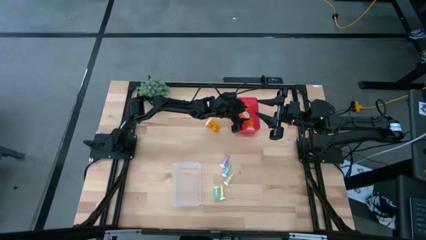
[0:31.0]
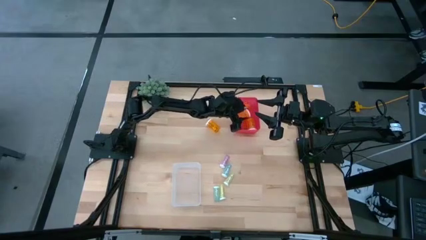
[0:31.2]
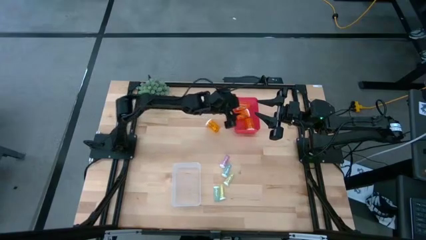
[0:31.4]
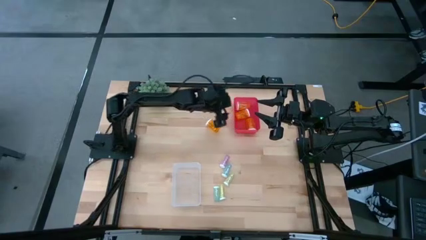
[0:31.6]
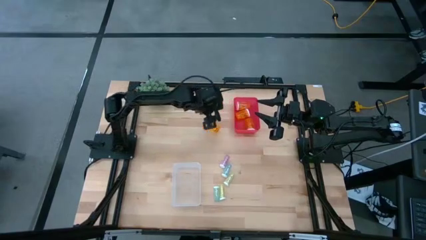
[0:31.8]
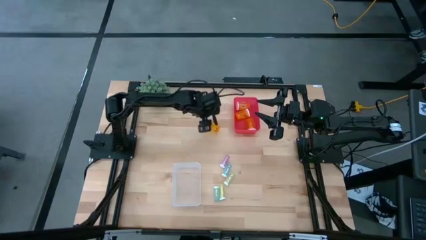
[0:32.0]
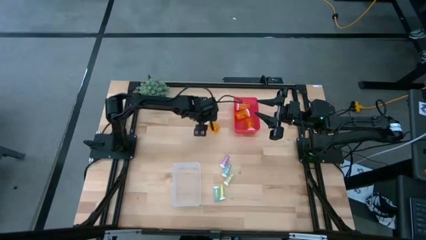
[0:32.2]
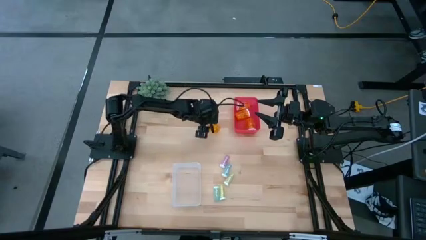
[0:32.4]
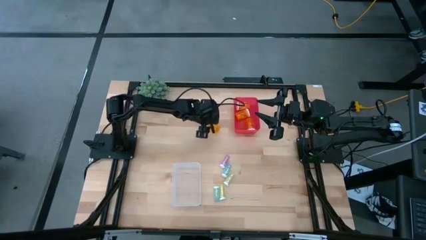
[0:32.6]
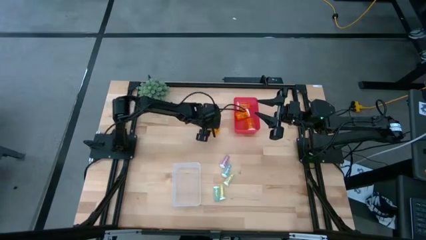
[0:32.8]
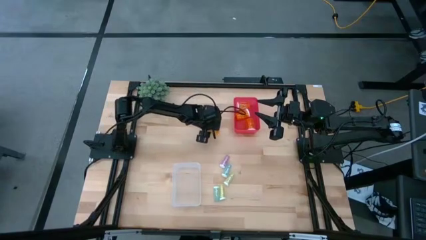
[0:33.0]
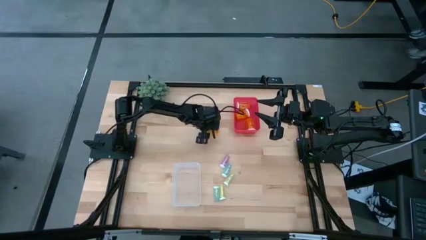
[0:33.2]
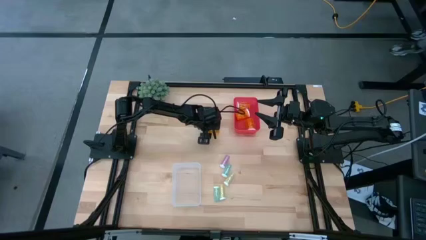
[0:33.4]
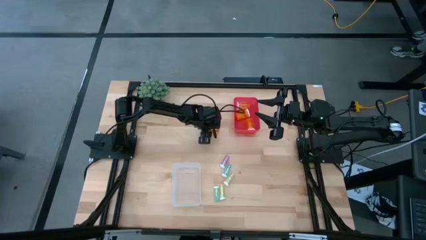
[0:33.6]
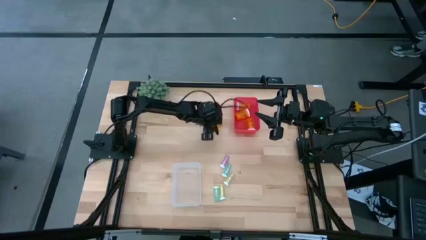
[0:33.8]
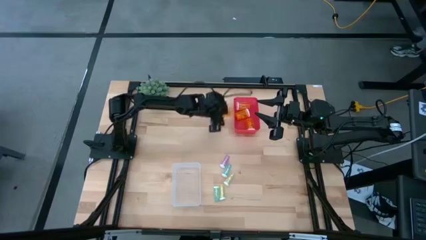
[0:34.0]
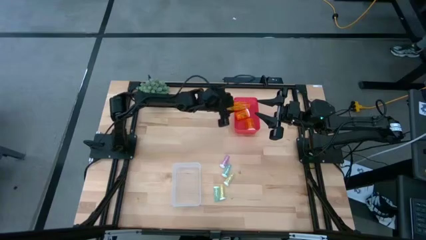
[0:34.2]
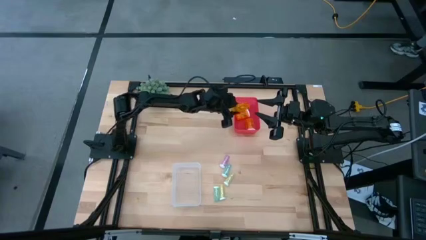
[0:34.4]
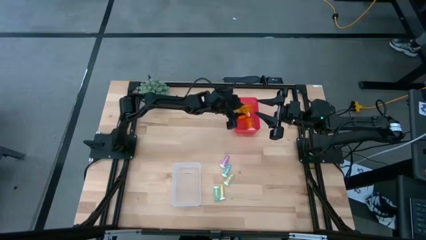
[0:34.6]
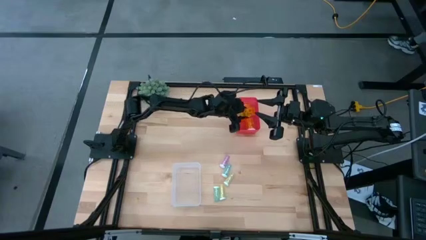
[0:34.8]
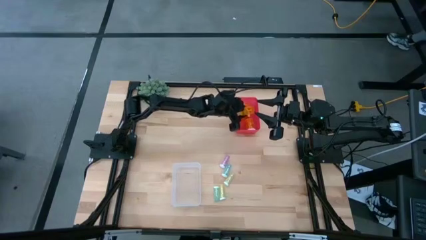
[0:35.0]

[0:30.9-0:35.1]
Task: Pick and place medicine bottles into bin by pill shape (circle, oval)
Put the large orange pill bottle into the red bin

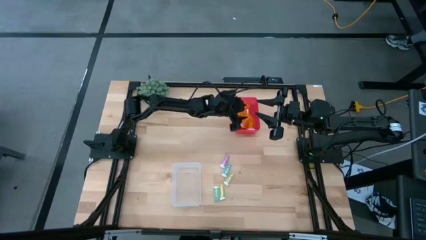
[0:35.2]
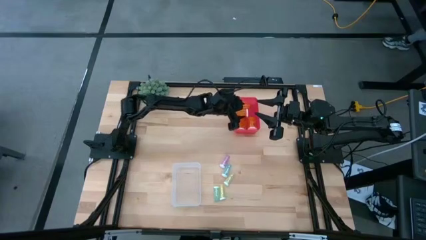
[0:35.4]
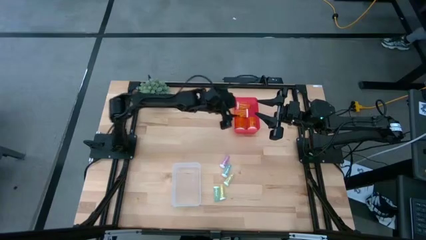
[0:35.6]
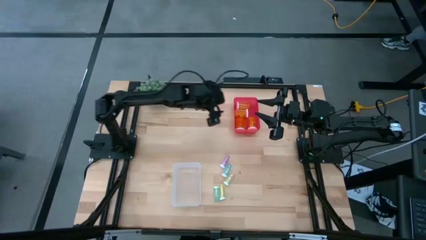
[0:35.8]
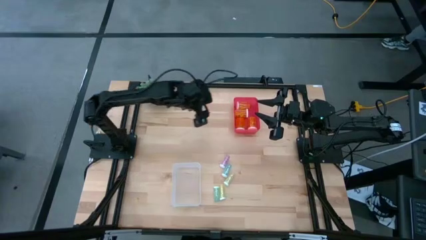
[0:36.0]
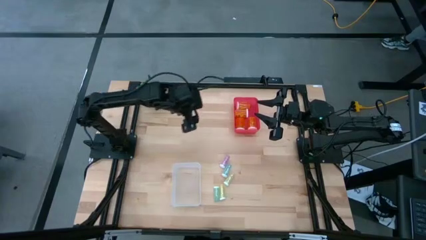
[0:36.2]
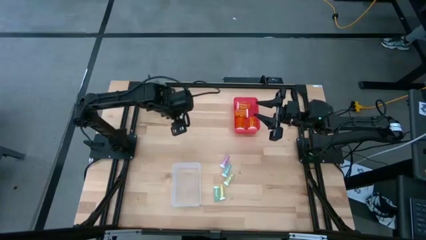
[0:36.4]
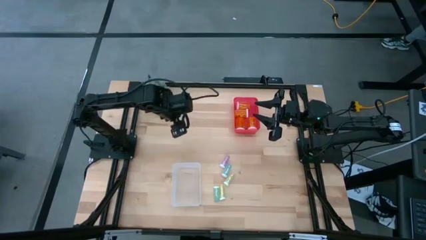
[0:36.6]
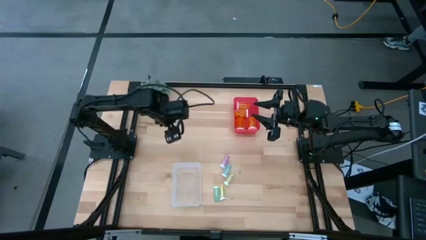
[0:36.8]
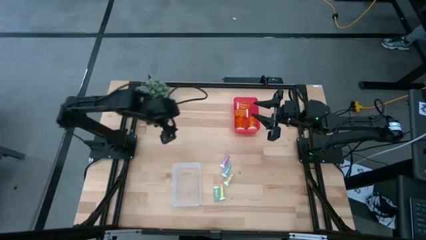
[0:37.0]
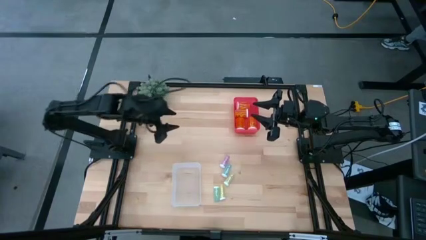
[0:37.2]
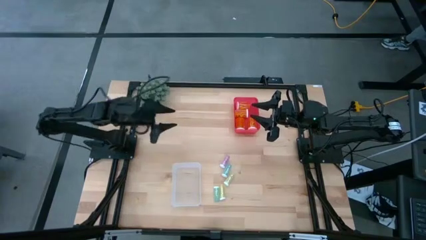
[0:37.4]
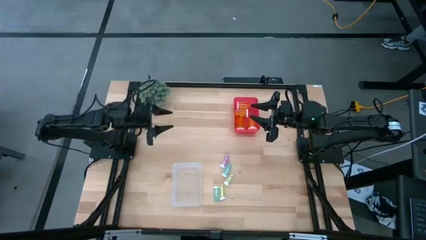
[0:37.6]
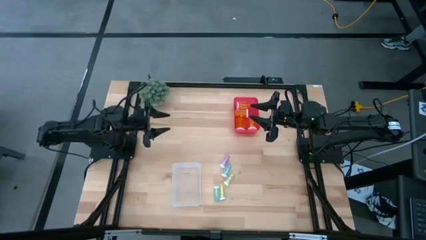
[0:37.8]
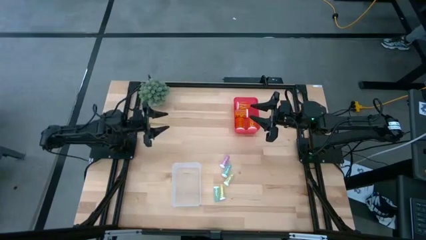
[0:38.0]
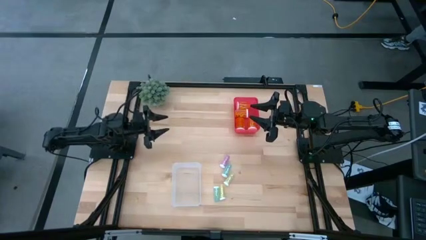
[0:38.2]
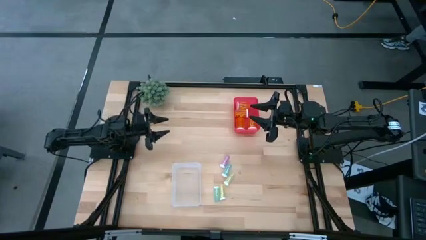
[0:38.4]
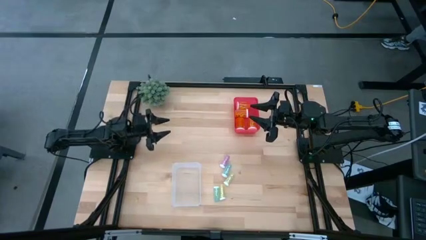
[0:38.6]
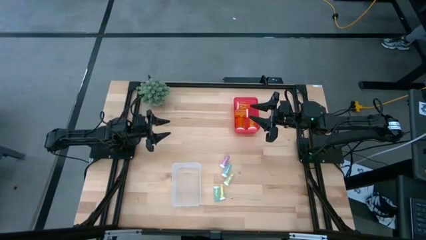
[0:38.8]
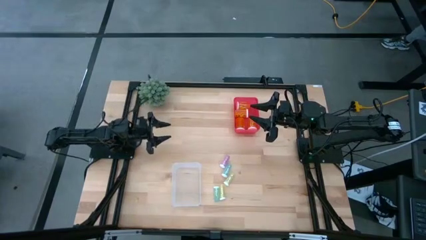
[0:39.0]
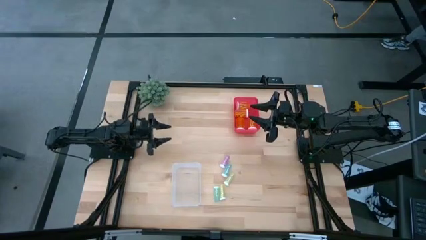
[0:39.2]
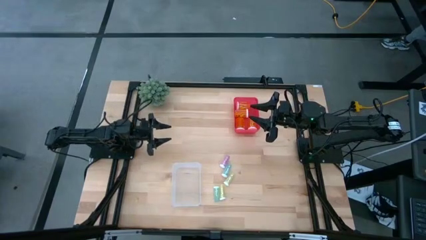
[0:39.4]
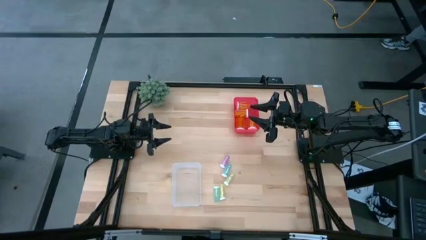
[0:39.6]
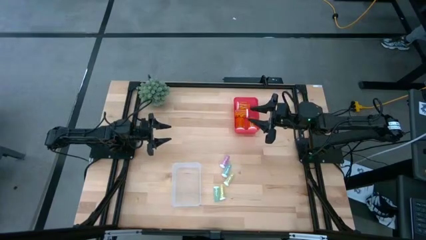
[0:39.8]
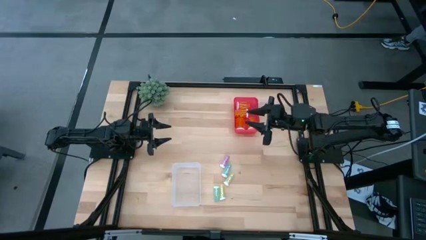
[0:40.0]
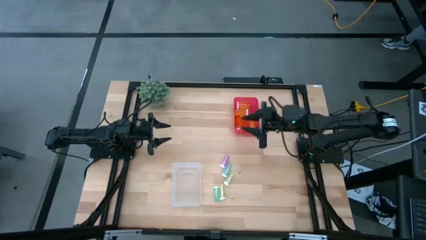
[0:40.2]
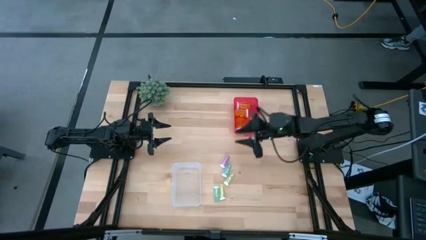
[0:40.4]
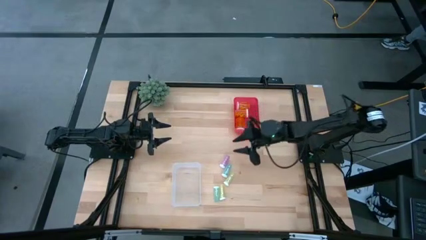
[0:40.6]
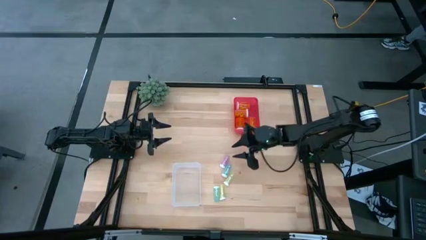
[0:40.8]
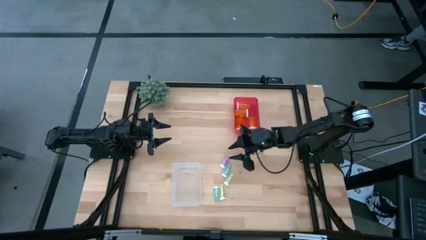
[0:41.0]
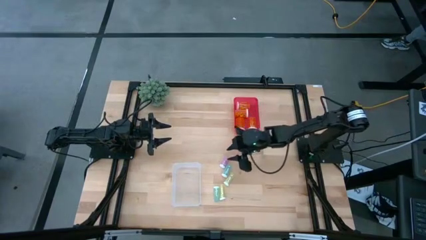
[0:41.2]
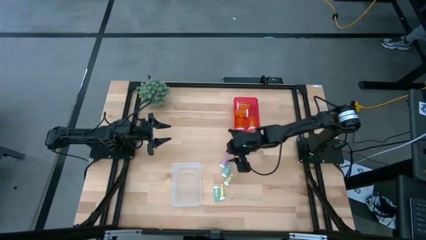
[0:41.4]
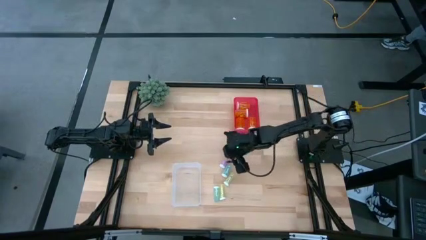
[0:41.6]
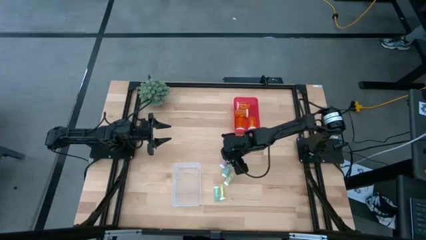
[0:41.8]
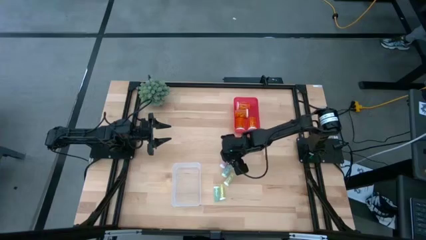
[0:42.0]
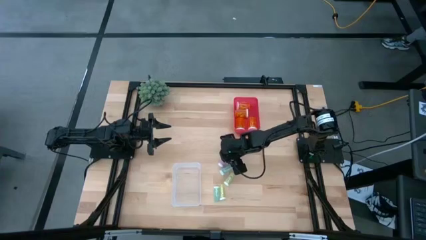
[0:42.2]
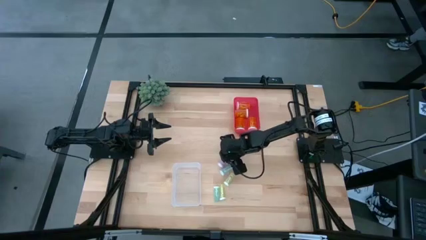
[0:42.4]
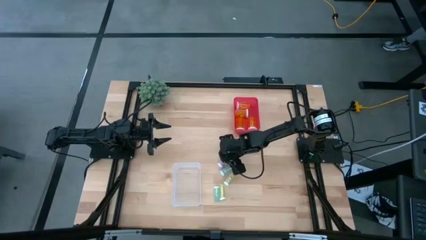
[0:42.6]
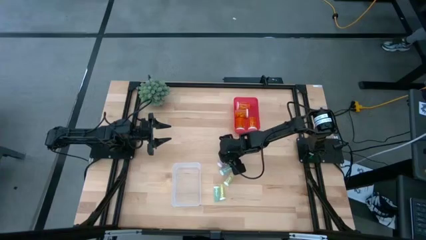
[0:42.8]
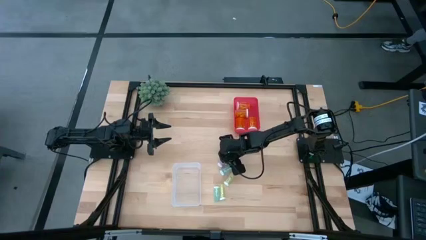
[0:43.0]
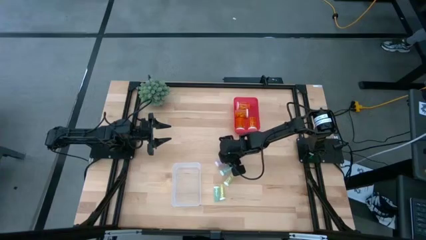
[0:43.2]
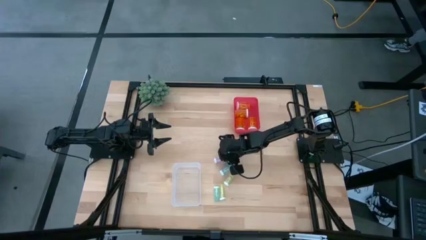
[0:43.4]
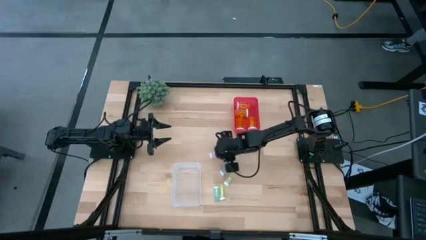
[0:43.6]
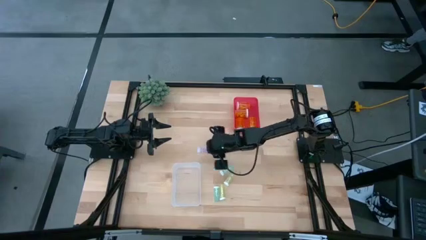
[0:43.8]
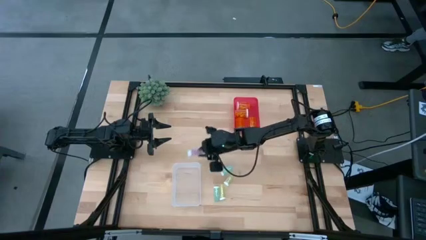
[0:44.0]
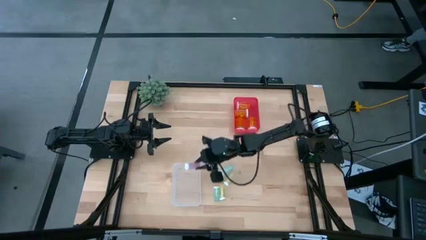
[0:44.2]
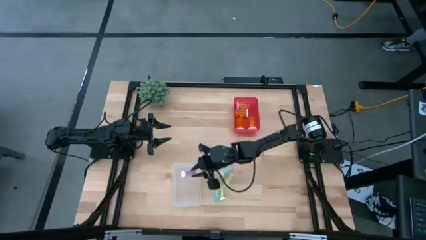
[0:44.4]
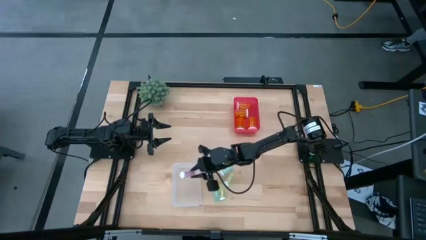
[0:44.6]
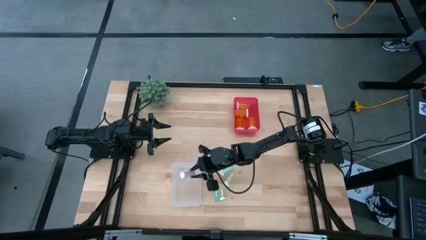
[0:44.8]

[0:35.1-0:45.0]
Put the small purple pill bottle into the transparent bin

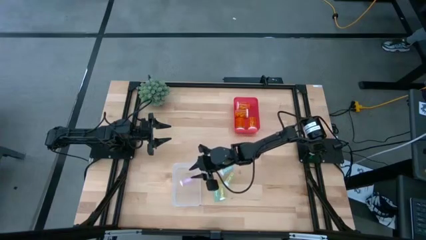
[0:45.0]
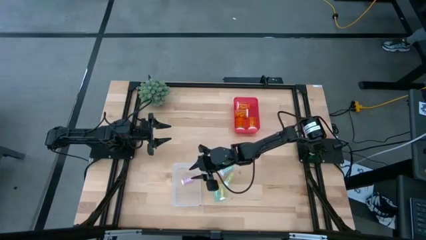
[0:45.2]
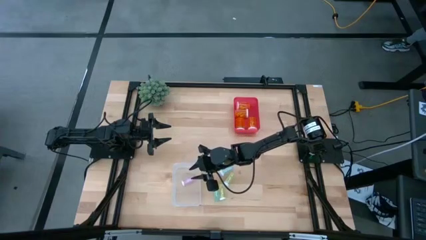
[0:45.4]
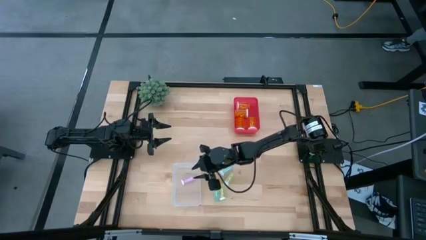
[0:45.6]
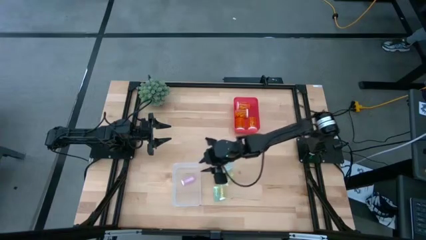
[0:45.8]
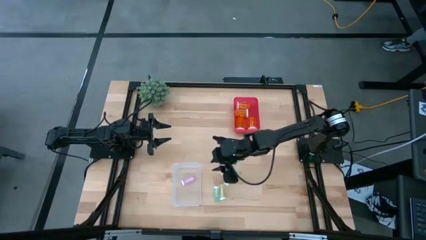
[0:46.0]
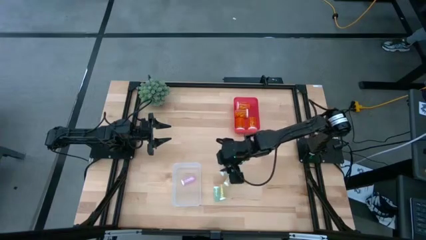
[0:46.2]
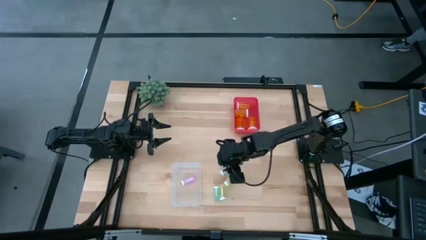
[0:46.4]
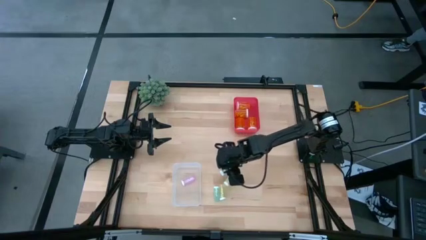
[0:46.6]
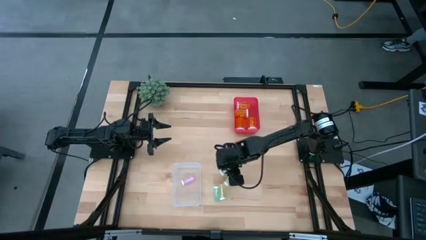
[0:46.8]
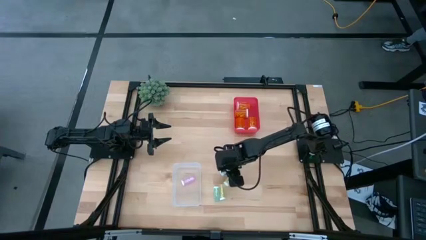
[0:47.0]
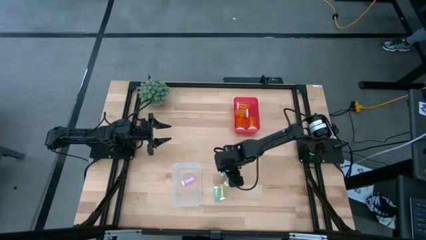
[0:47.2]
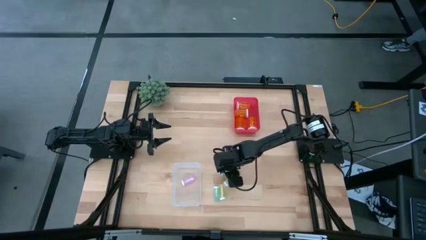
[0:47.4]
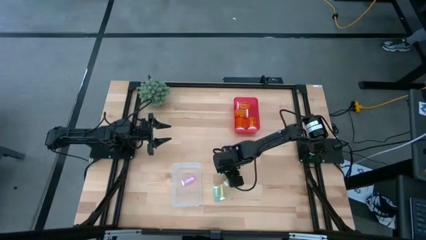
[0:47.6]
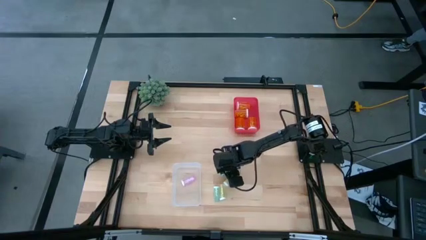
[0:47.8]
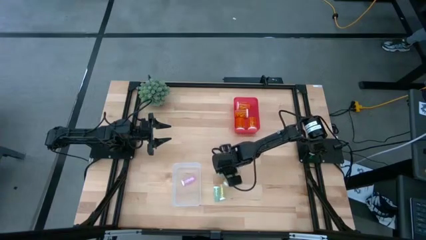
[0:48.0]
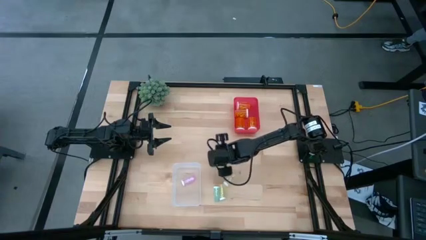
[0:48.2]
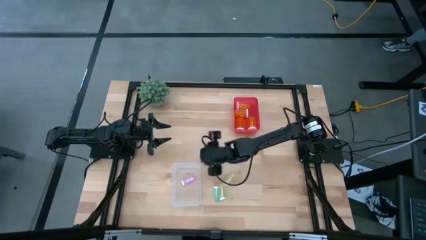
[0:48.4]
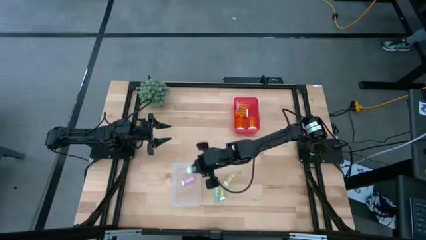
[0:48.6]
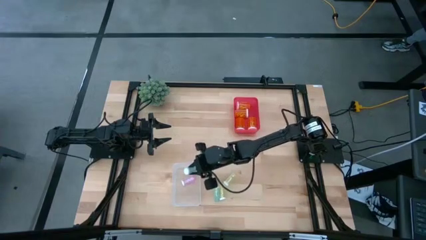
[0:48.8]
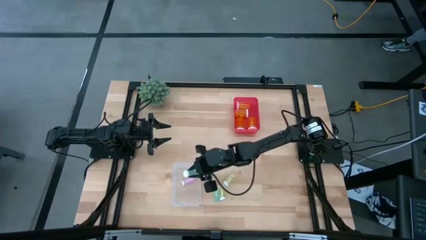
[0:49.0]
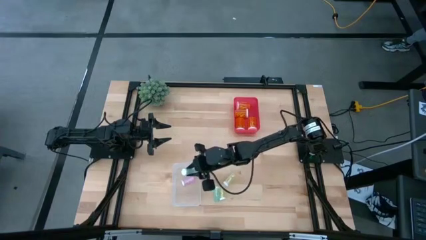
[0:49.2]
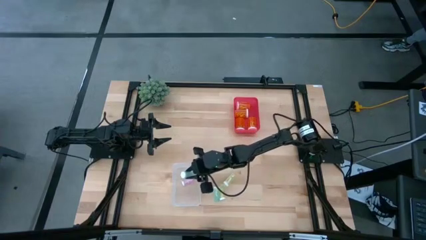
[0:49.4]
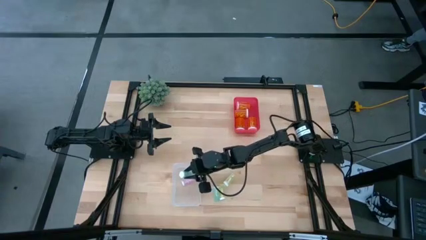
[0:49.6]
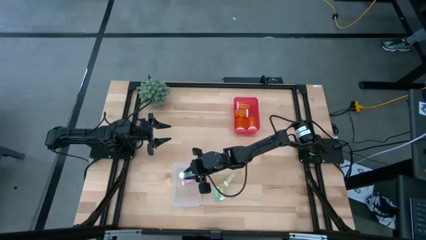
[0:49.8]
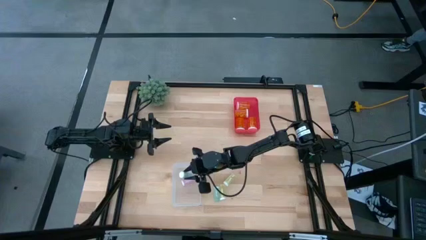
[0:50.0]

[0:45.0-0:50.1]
Put the small green pill bottle into the transparent bin
